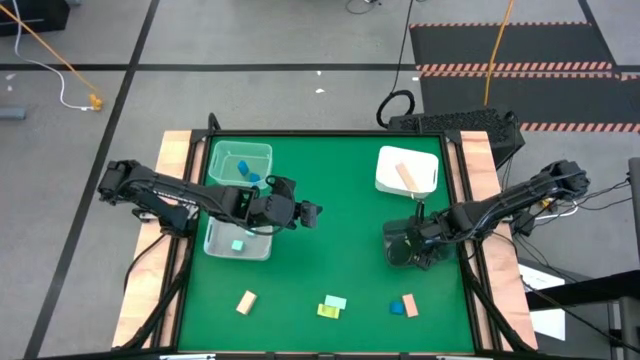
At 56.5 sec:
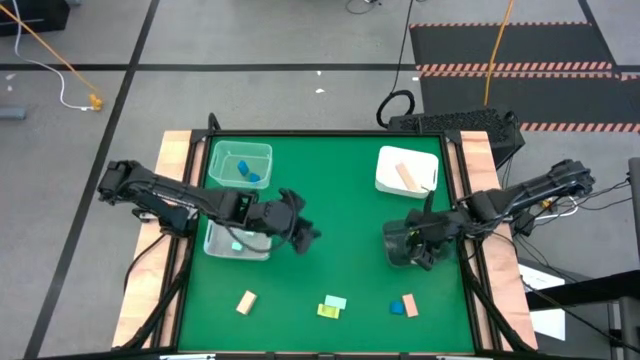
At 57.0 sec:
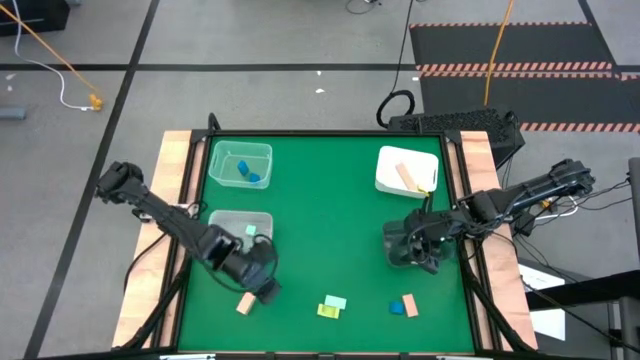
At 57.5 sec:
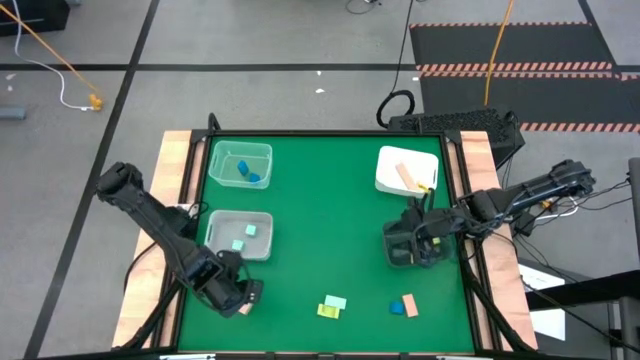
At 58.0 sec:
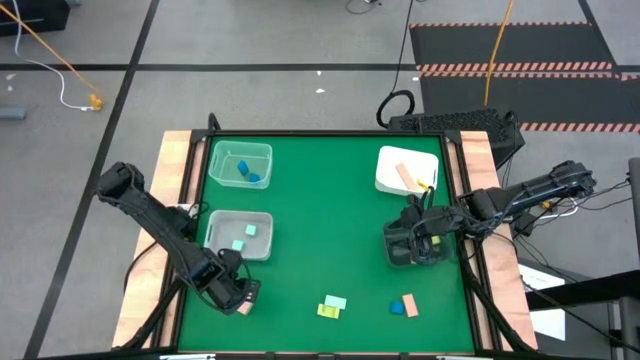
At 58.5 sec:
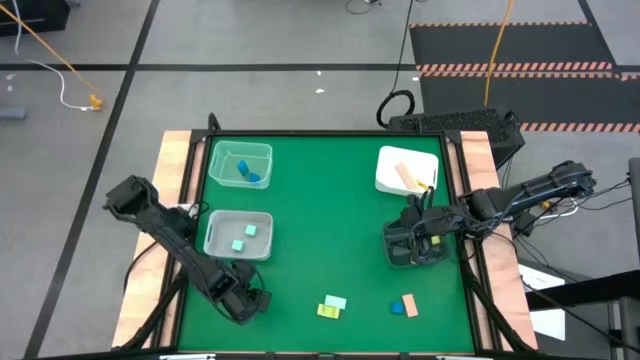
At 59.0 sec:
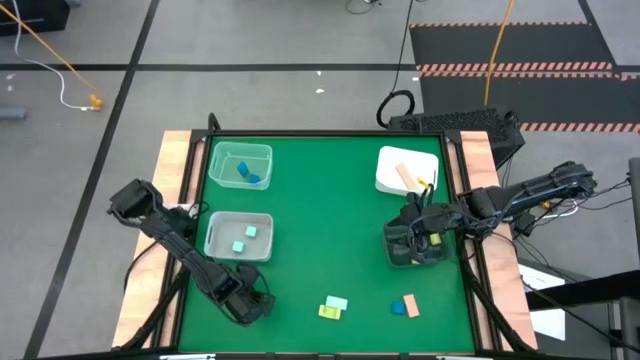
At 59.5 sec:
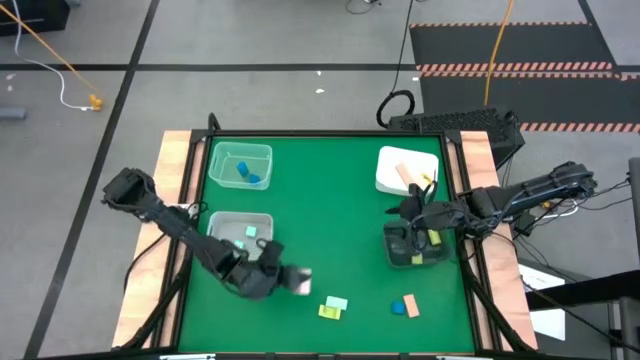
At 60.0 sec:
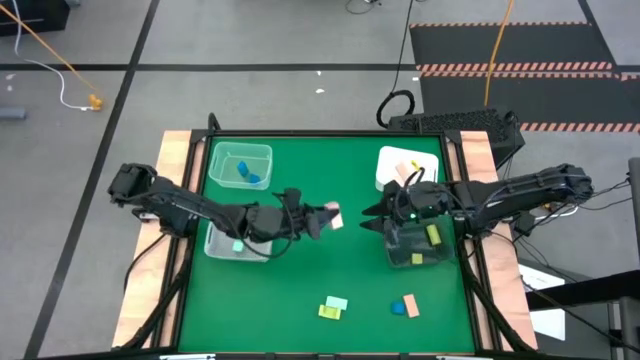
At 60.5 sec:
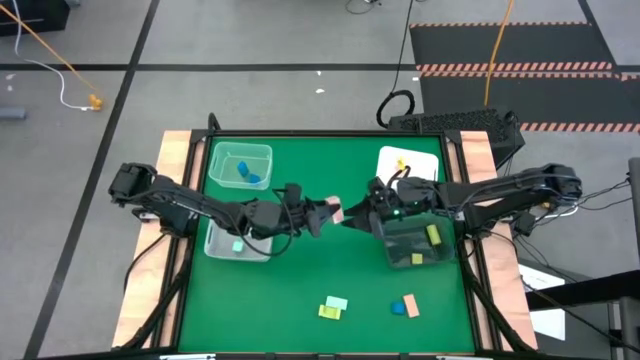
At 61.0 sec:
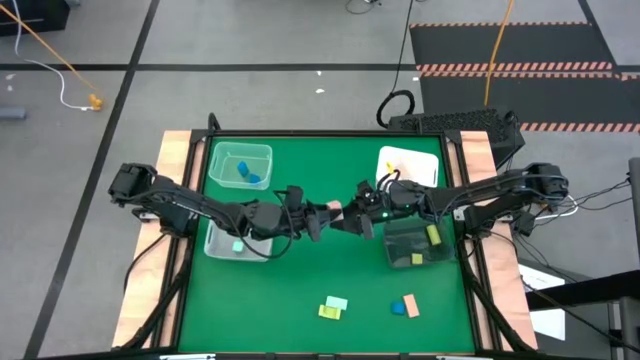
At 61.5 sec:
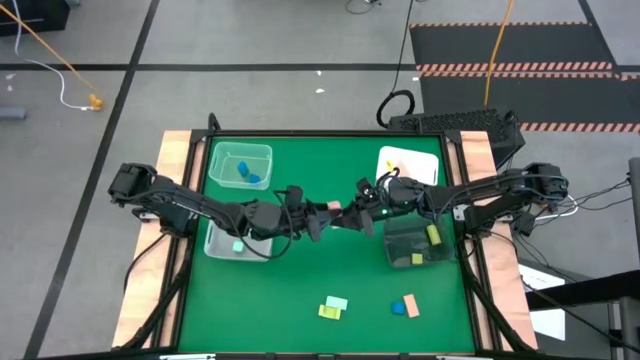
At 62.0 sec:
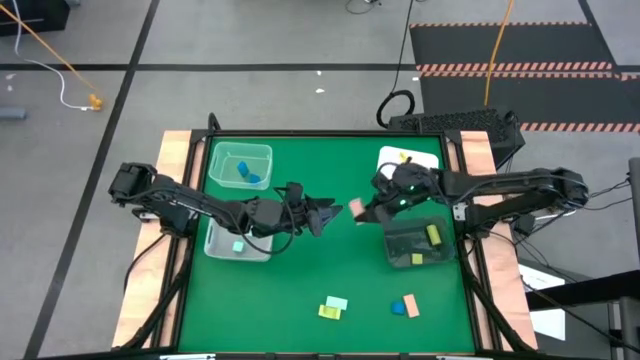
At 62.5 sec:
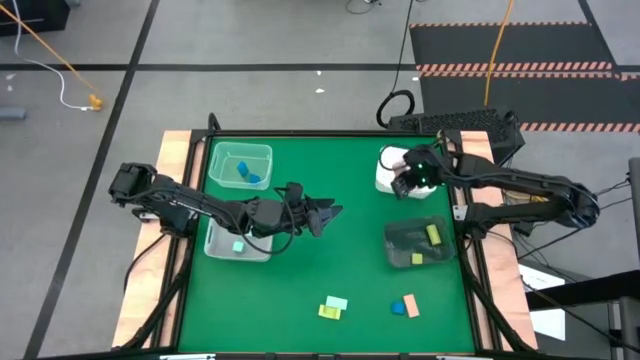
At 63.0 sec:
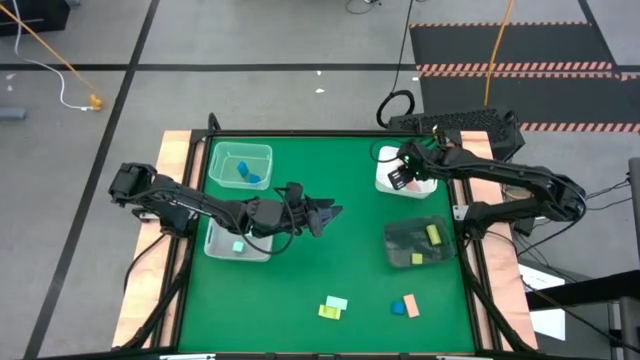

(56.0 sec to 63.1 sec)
Task: Sort & place blocks by color
Put the left brown block into the white bin

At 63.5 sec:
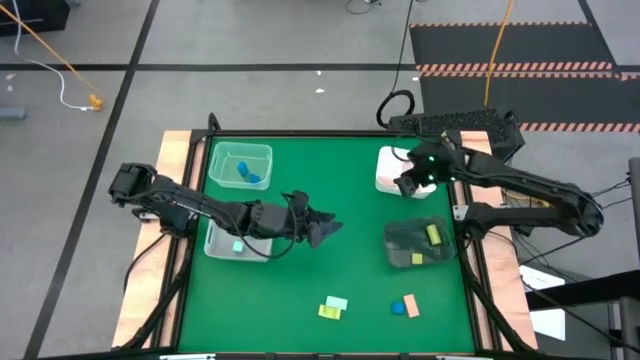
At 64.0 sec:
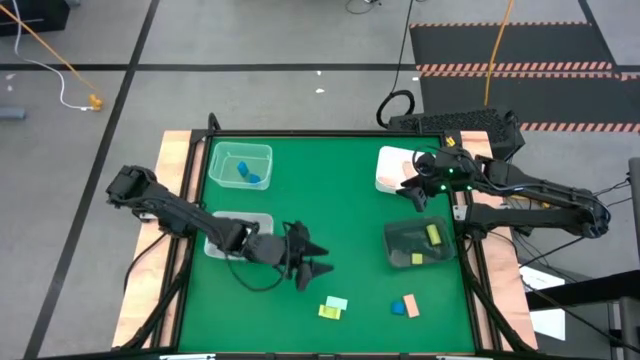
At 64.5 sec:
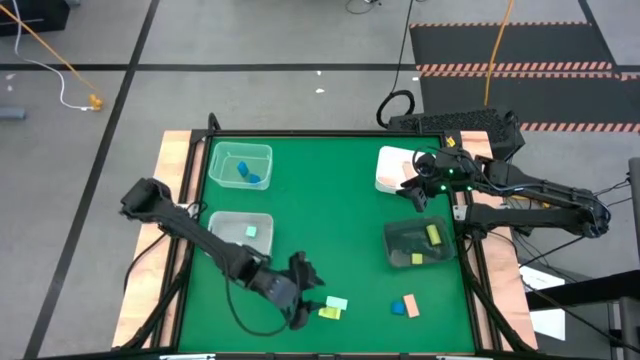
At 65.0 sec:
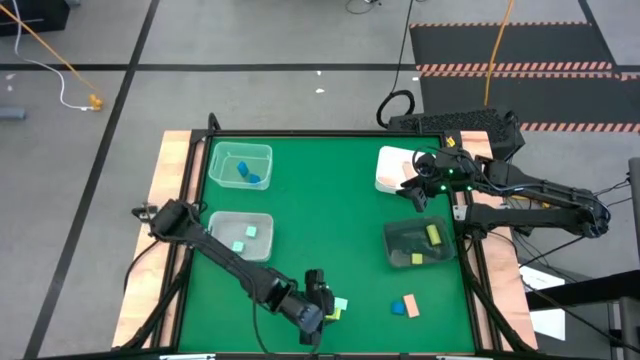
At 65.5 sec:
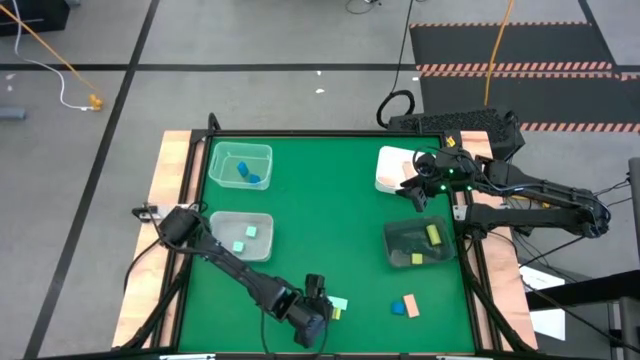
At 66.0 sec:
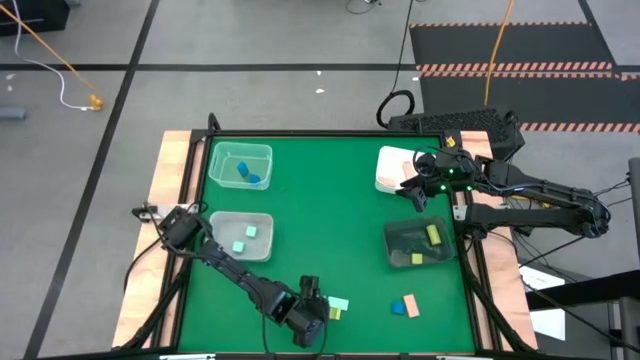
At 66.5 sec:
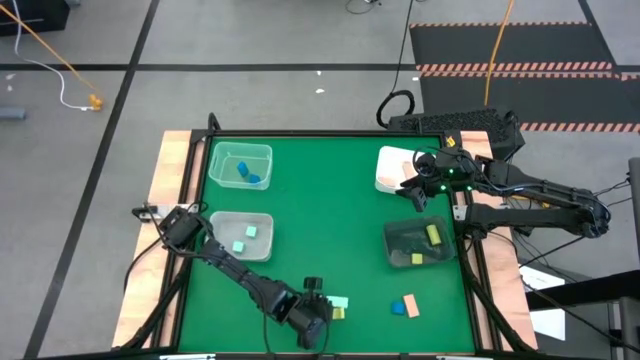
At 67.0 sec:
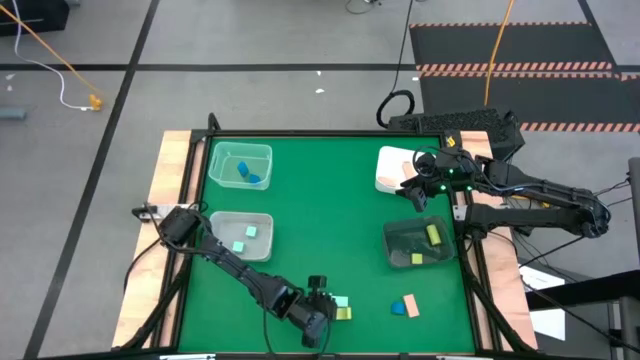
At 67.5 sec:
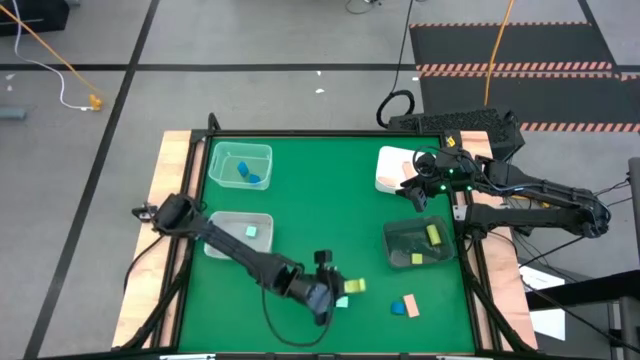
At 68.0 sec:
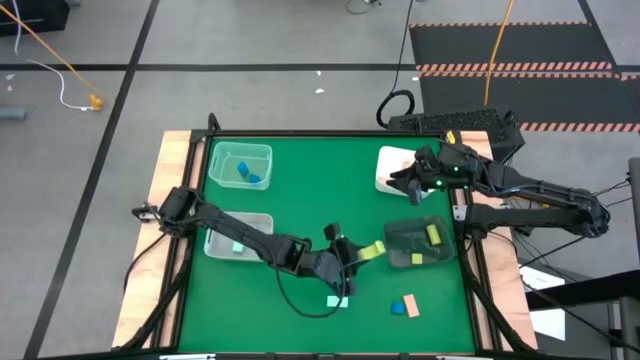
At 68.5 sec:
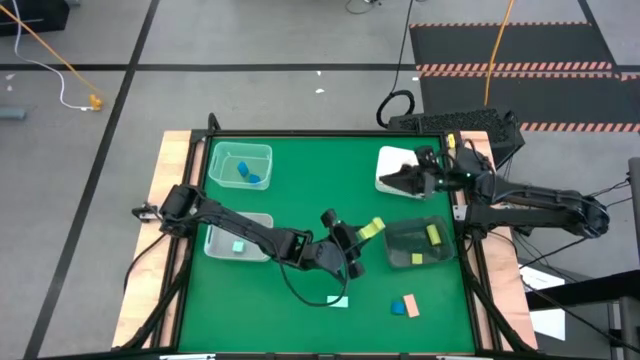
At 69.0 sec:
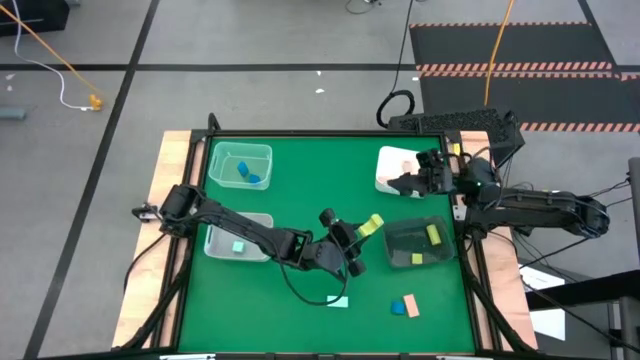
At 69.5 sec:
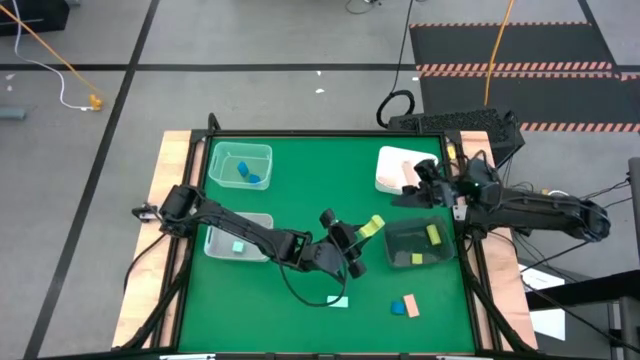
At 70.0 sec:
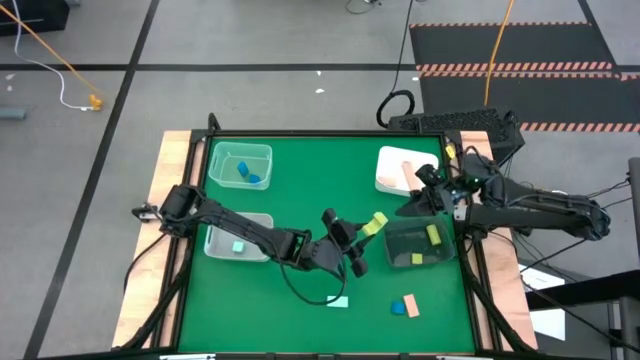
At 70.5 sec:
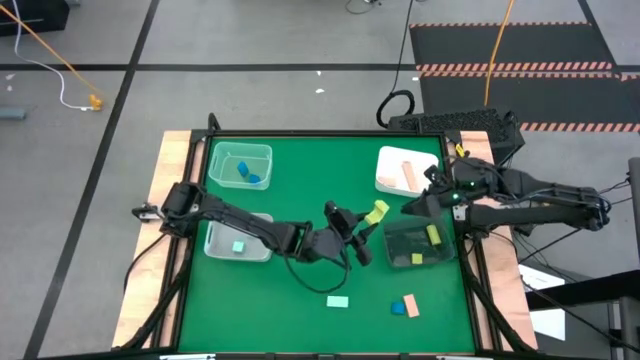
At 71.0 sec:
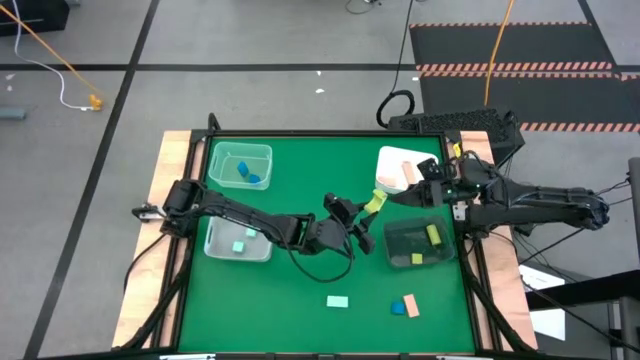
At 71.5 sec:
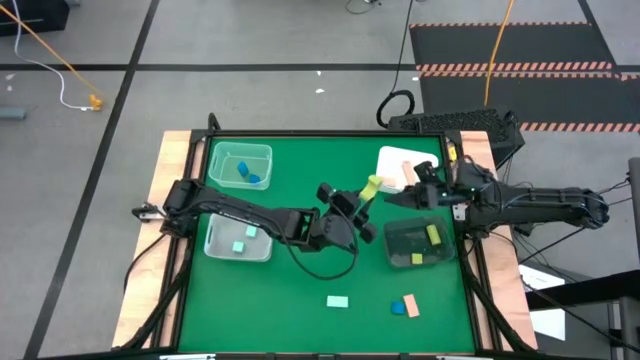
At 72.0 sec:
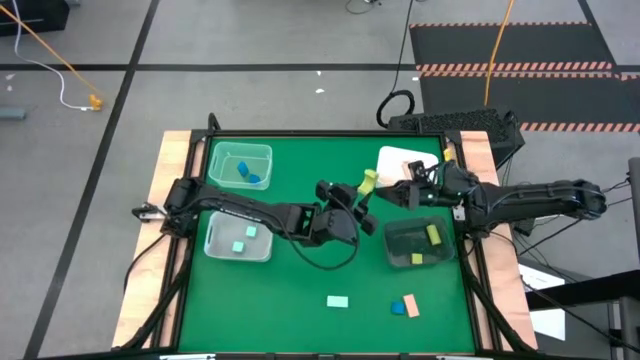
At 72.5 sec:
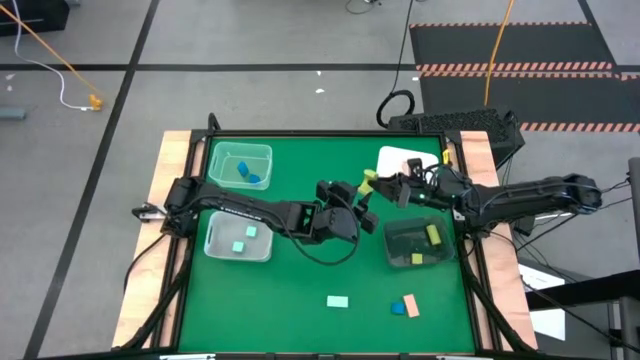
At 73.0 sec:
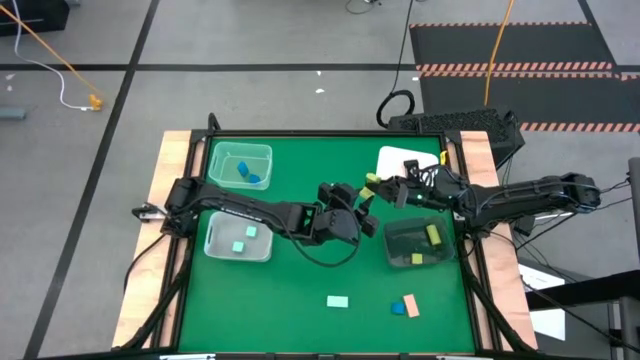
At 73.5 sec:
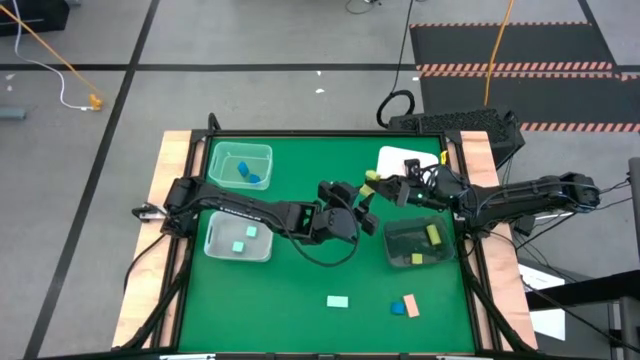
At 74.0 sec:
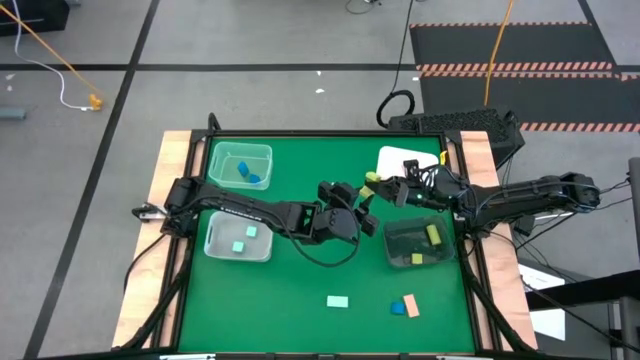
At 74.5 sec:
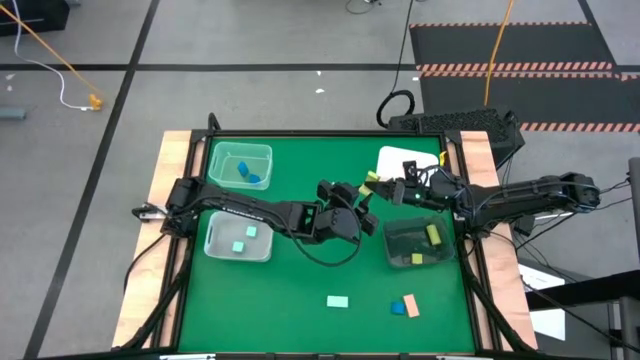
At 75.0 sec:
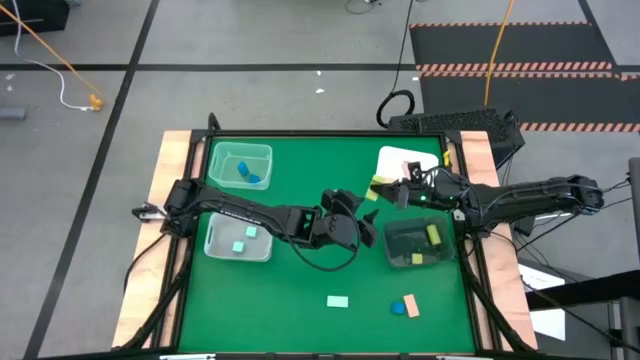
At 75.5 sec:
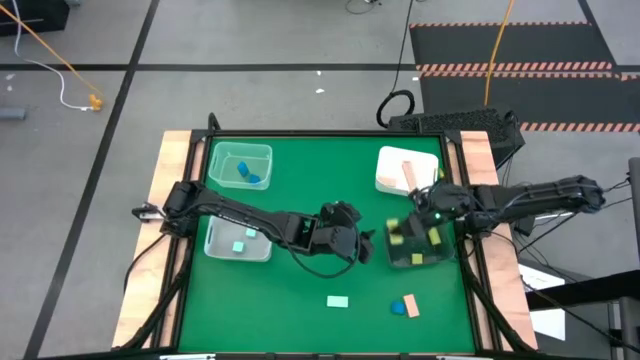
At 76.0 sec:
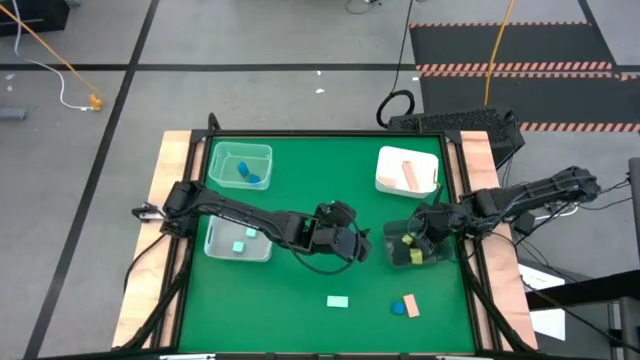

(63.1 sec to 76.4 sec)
Put the green block into the black transparent bin
